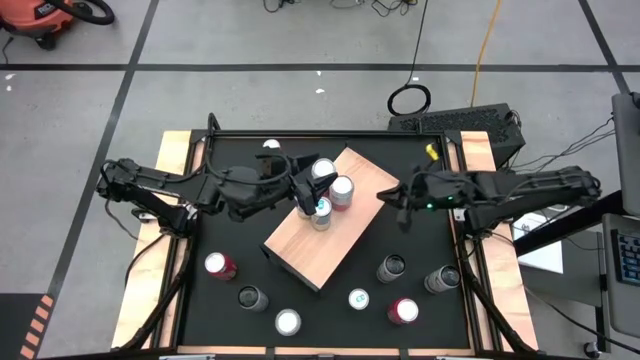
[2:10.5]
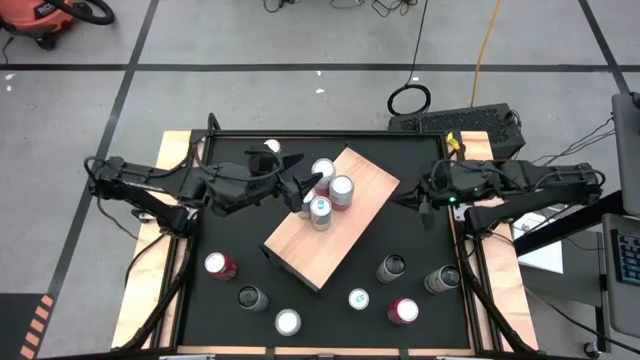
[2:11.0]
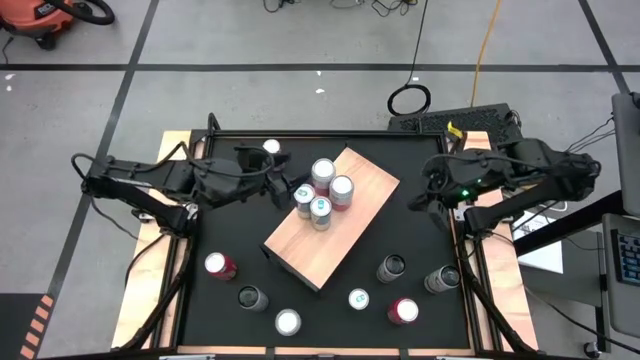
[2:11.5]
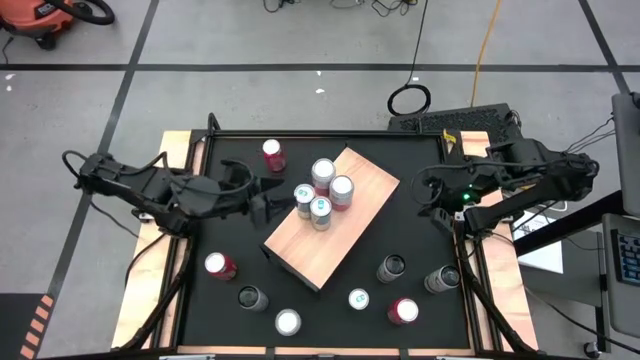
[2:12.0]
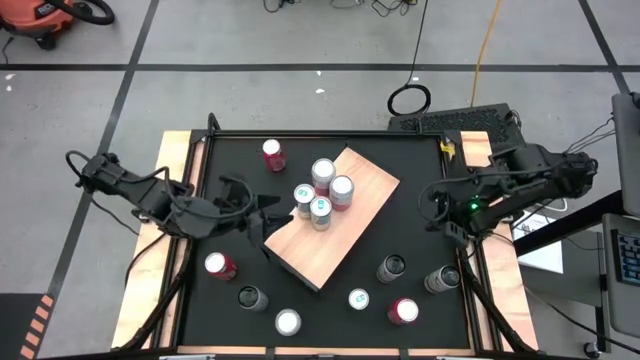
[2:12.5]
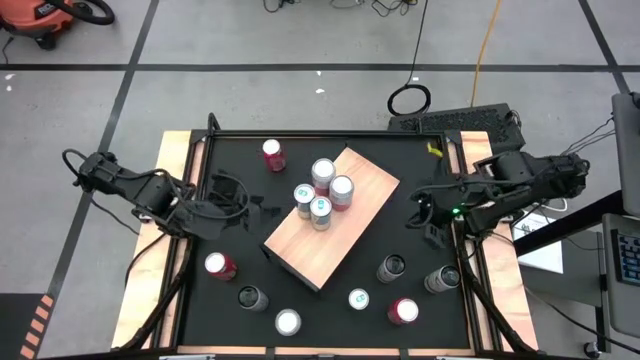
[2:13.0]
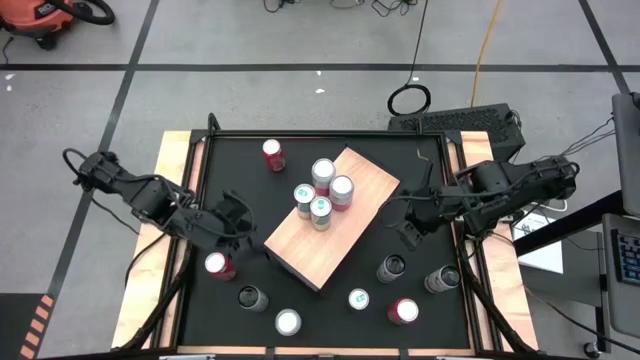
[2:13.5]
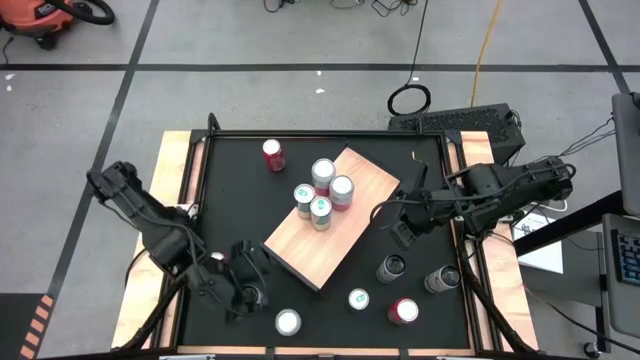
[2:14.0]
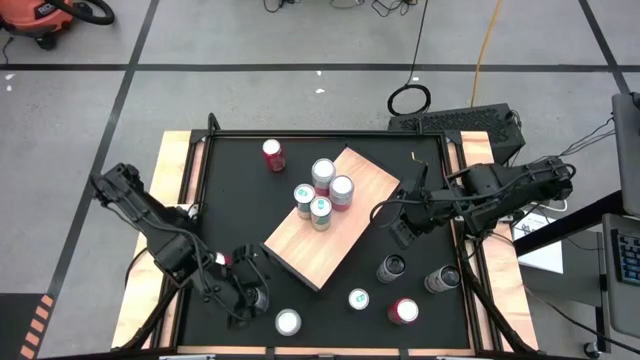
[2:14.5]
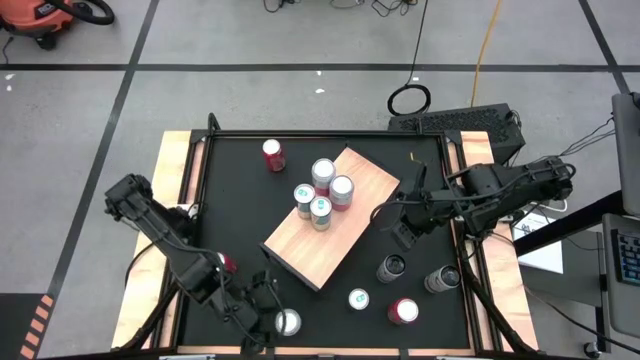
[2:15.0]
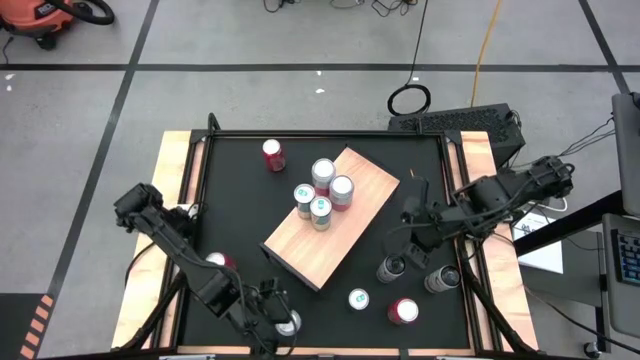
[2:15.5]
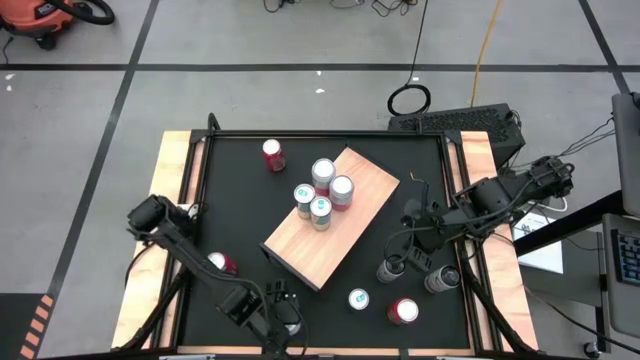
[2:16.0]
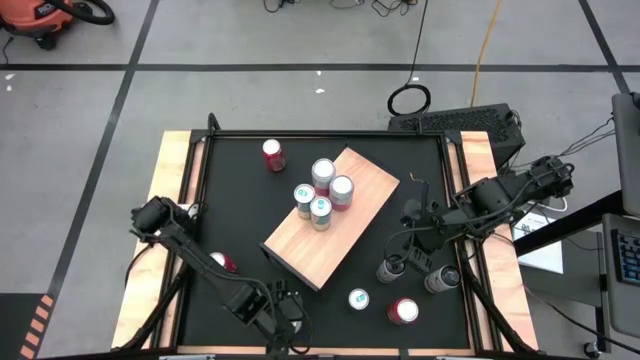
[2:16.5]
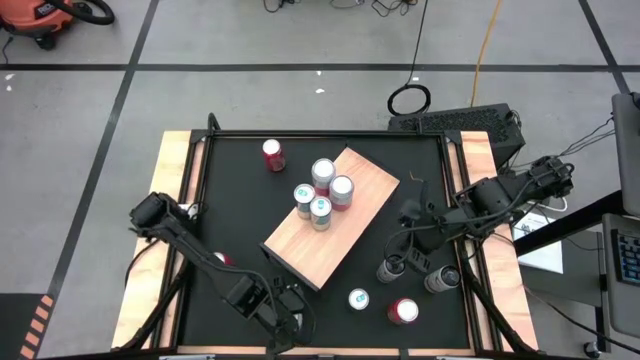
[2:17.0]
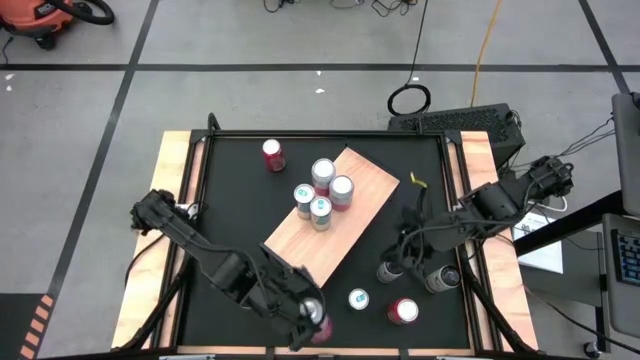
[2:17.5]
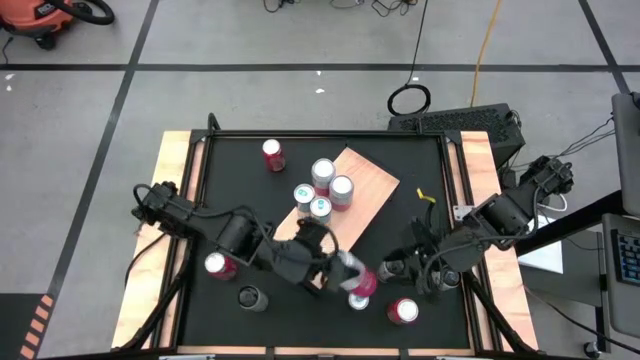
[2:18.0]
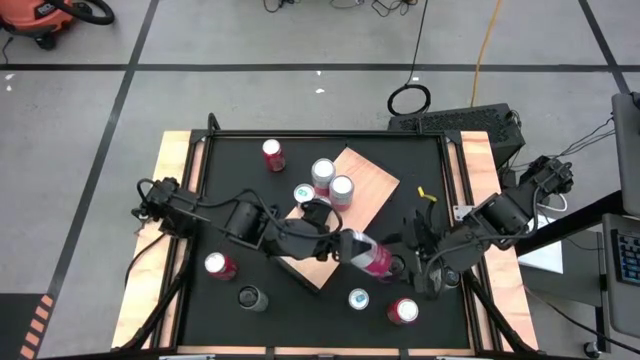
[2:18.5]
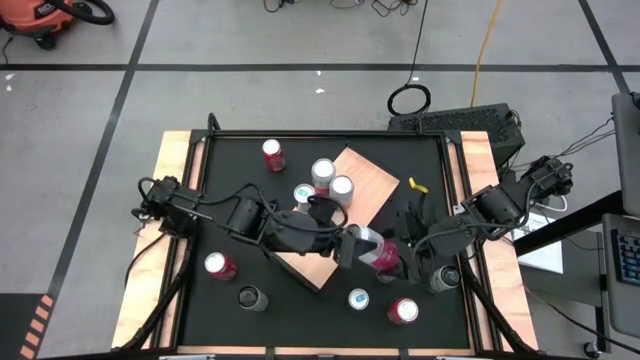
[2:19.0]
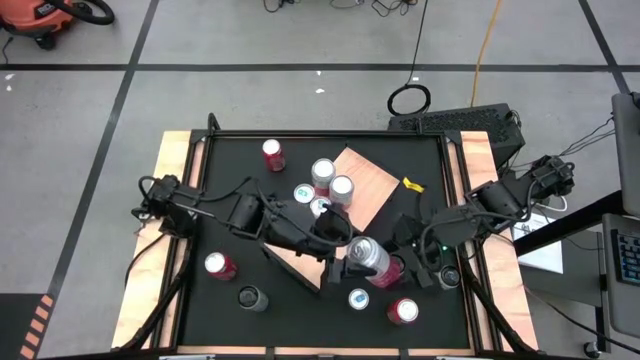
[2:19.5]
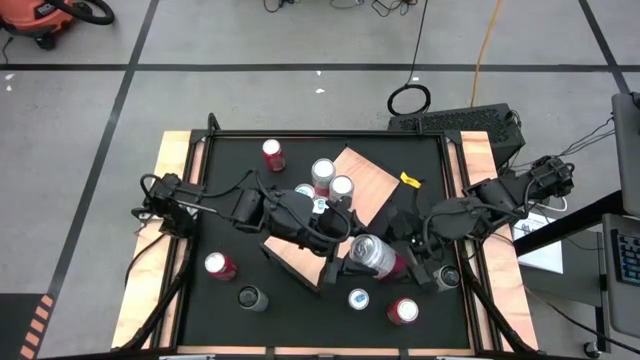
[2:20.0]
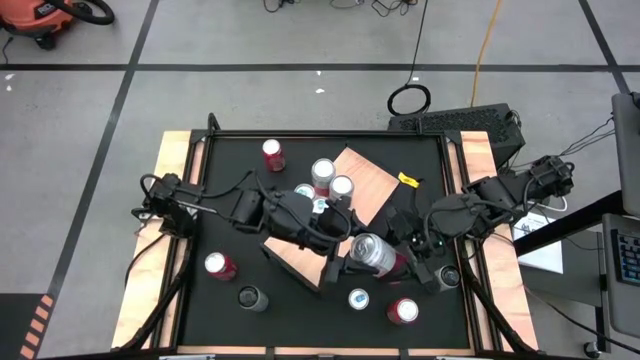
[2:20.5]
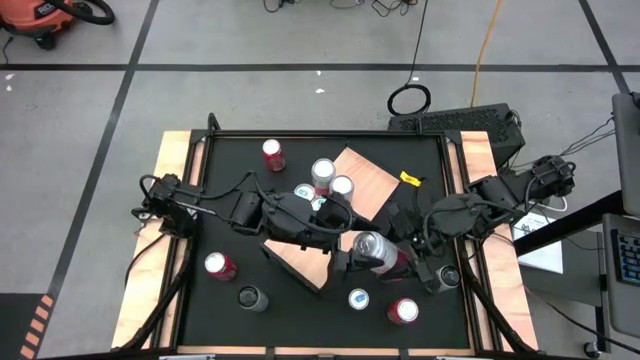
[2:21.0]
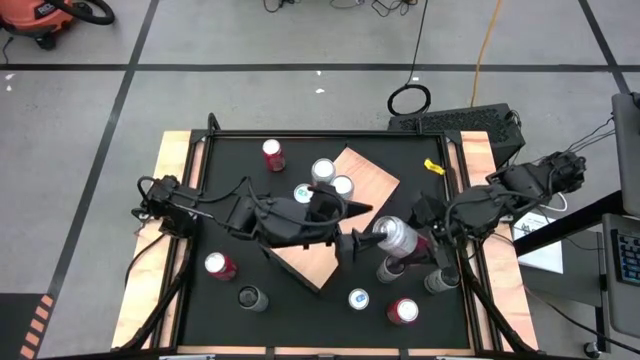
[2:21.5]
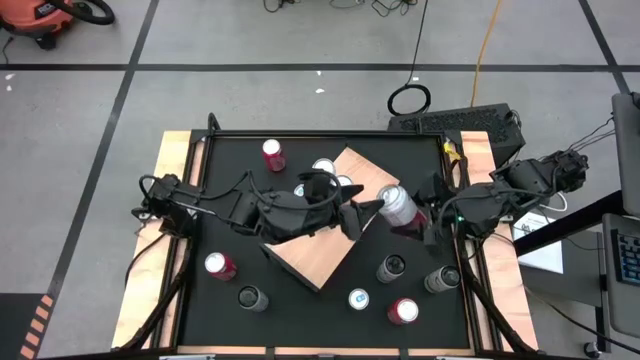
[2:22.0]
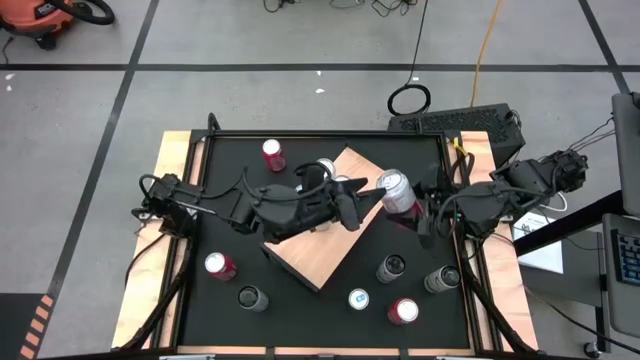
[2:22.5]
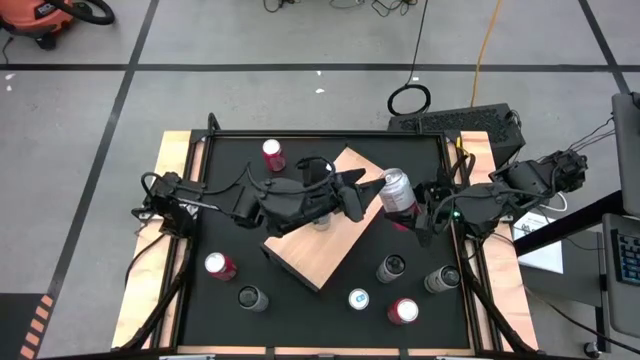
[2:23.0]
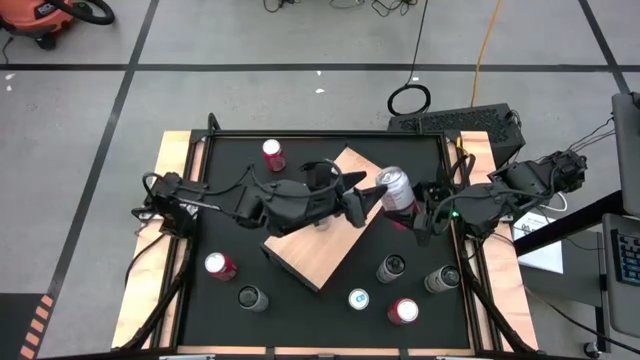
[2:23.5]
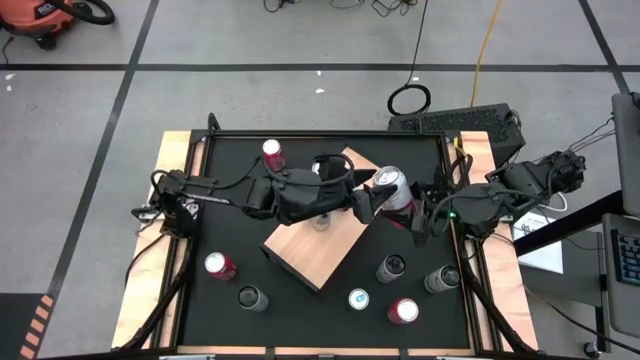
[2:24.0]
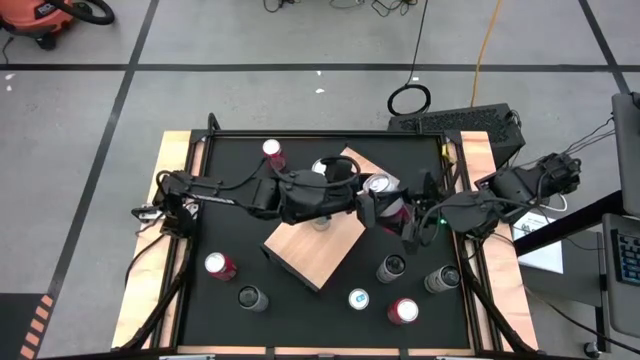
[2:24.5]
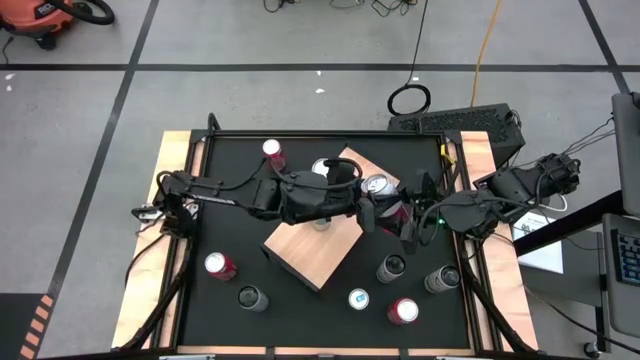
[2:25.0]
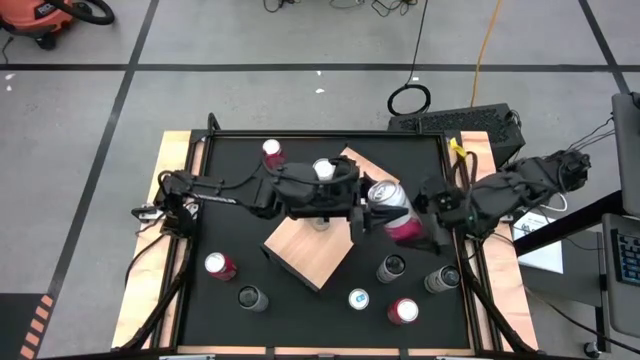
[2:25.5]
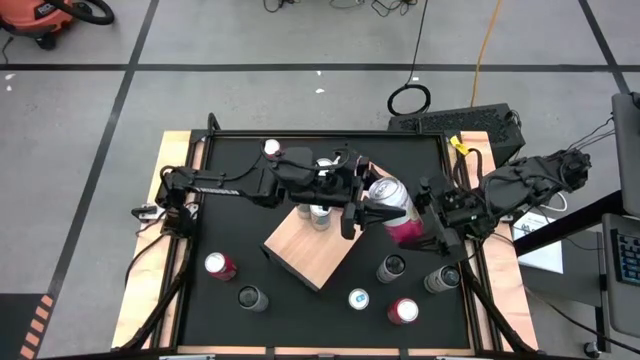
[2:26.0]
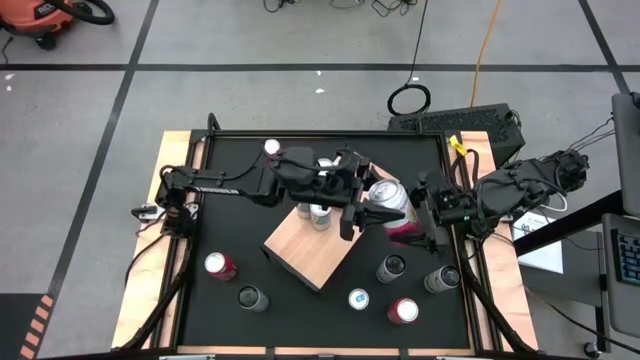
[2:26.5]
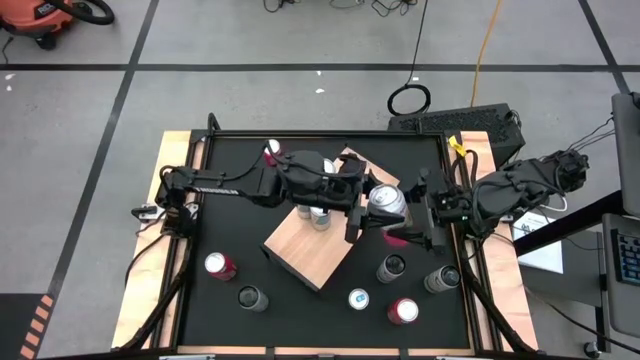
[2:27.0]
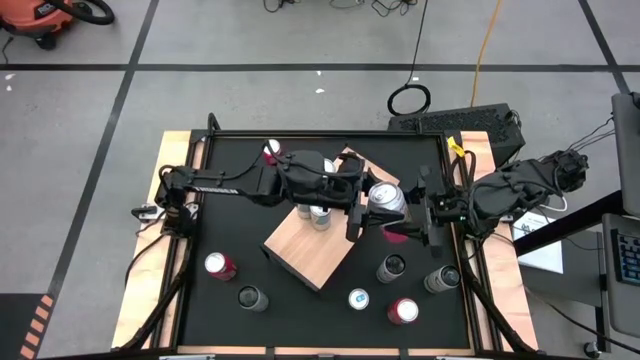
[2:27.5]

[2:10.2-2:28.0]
Task: Place canned beverage on shelf
Put the pink-white soda can on the shelf aligned with the pink-white soda can

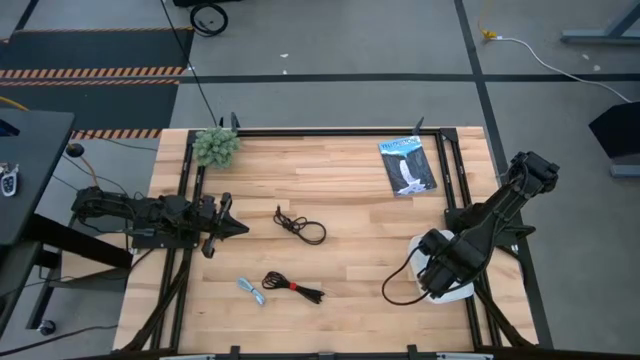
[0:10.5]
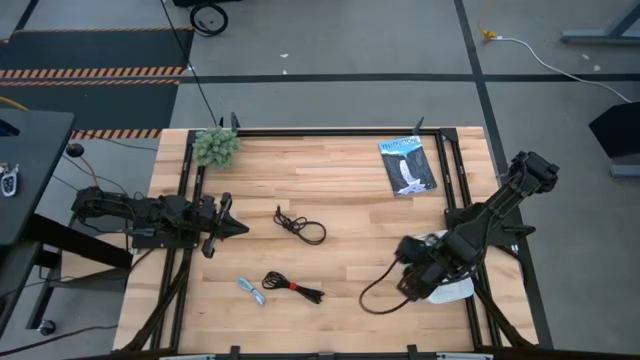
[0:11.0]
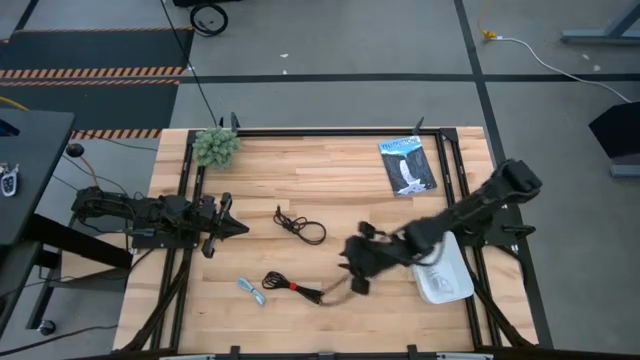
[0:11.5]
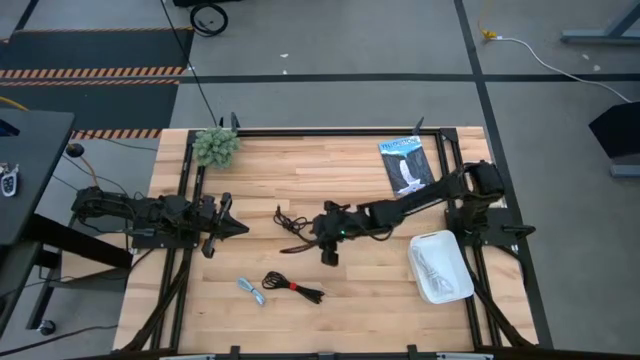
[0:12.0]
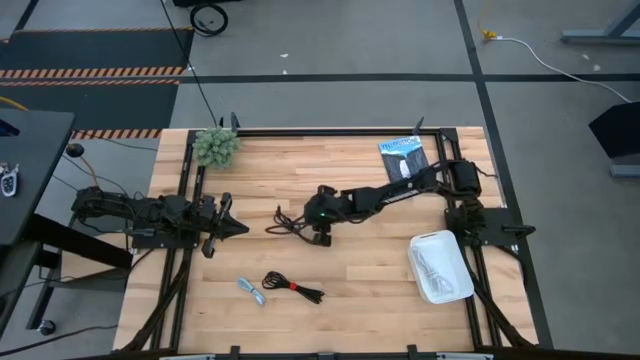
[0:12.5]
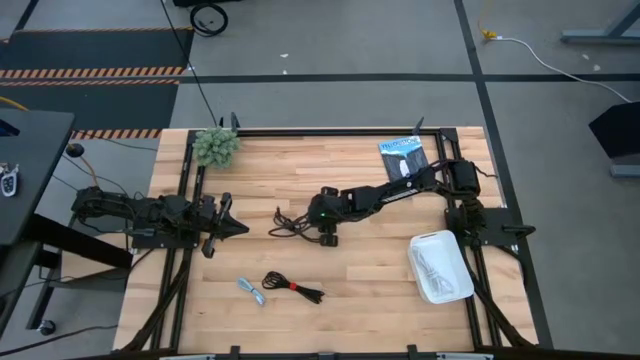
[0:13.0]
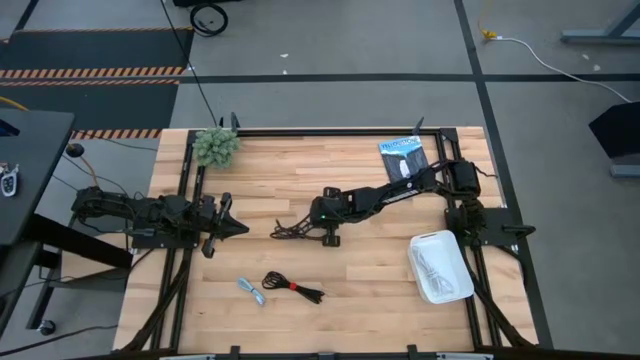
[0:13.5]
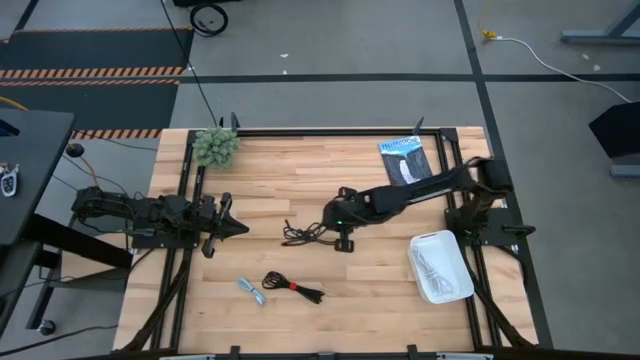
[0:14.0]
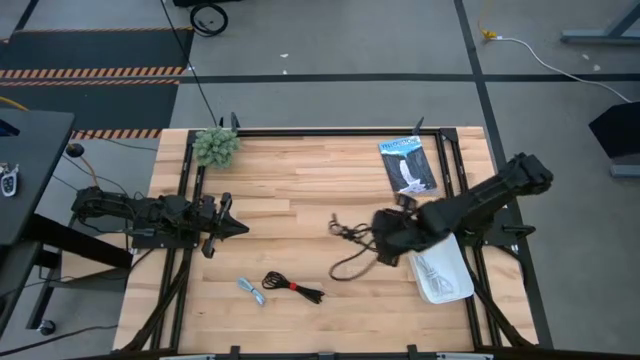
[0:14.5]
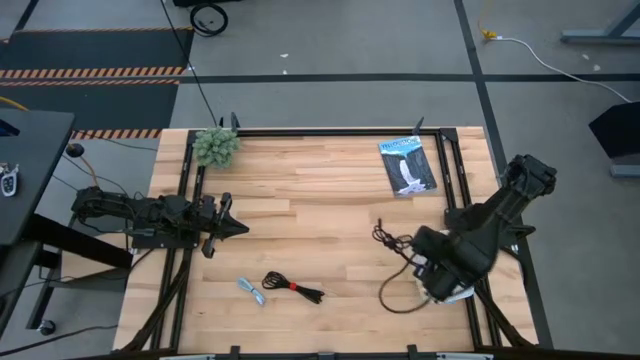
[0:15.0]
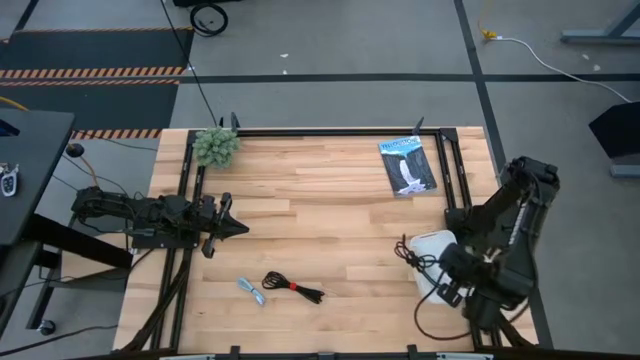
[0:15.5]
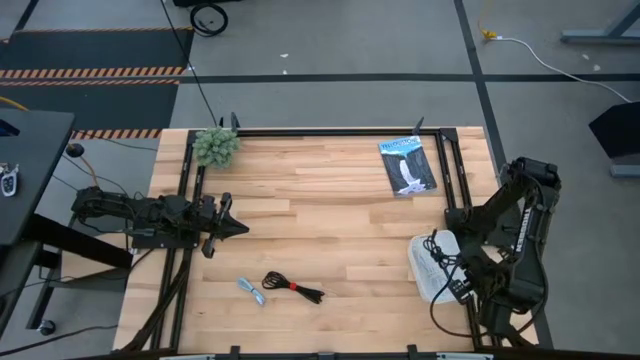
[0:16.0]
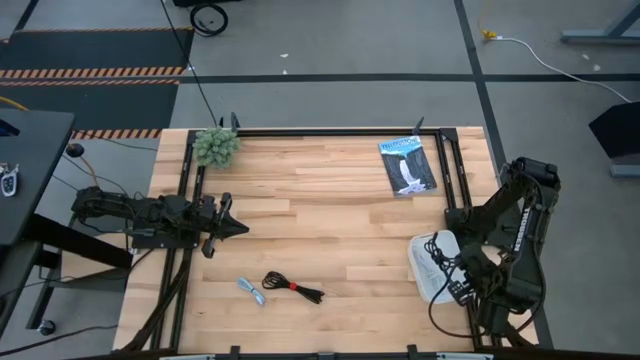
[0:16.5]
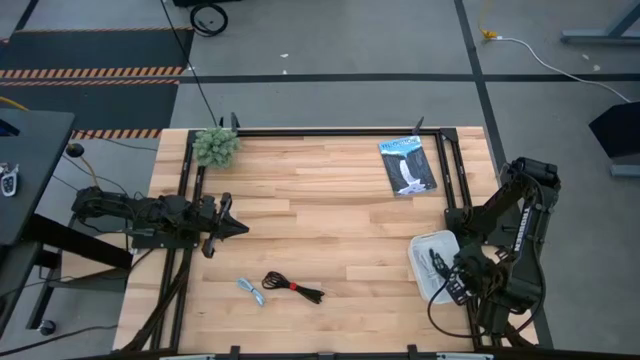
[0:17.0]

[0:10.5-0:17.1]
Task: Pick and place USB-C Cables
Put the top black charger cable into the white container
